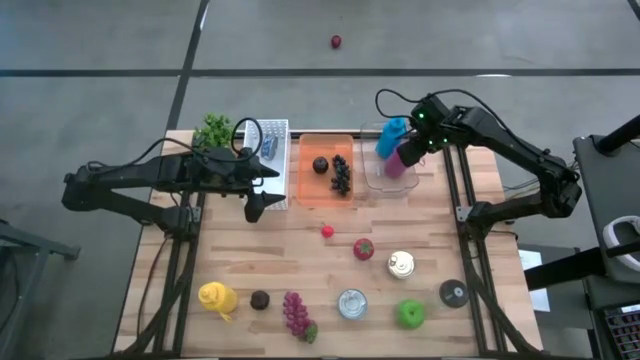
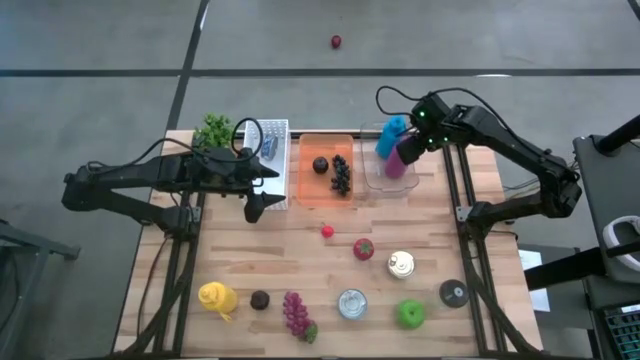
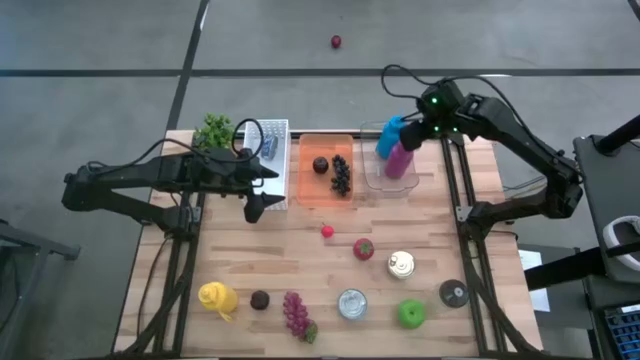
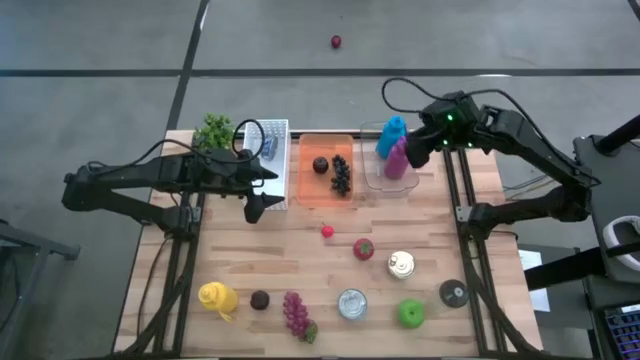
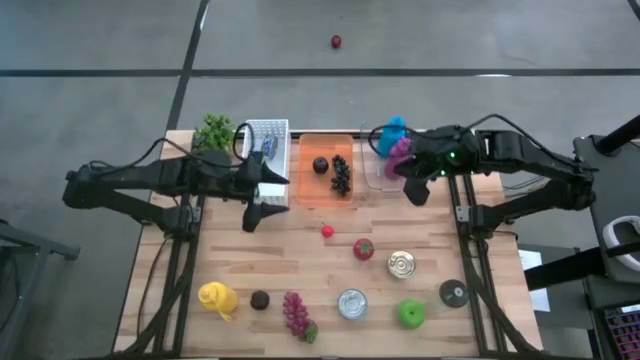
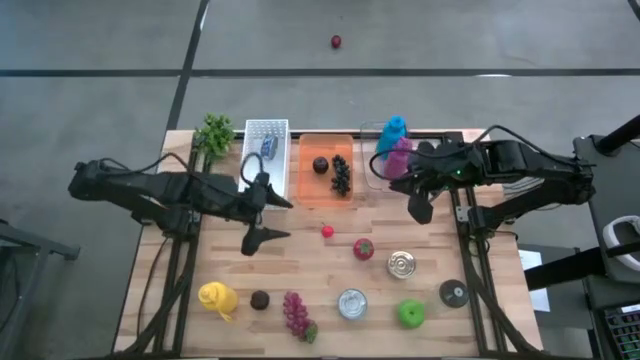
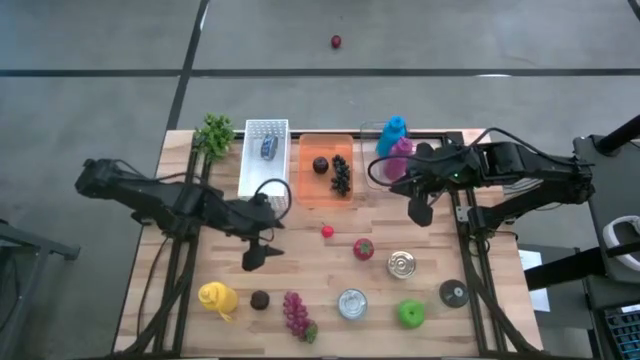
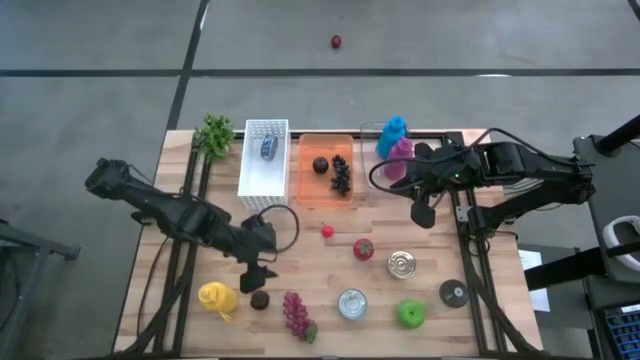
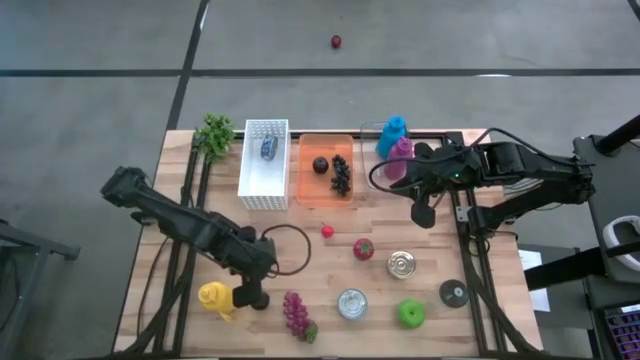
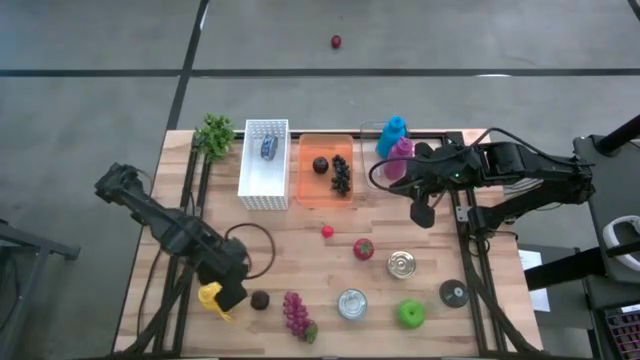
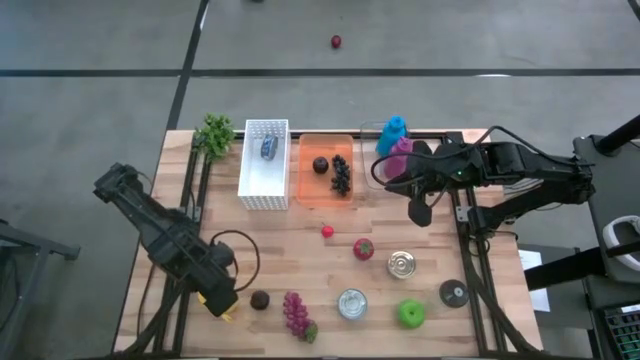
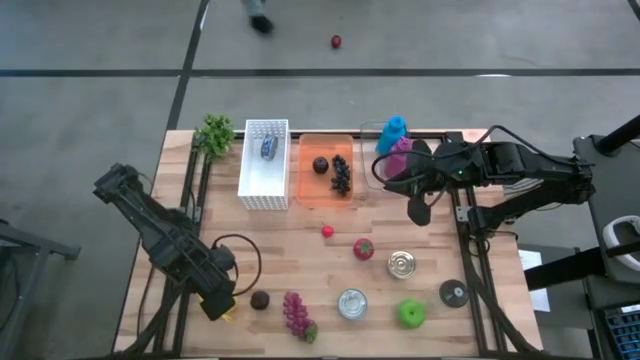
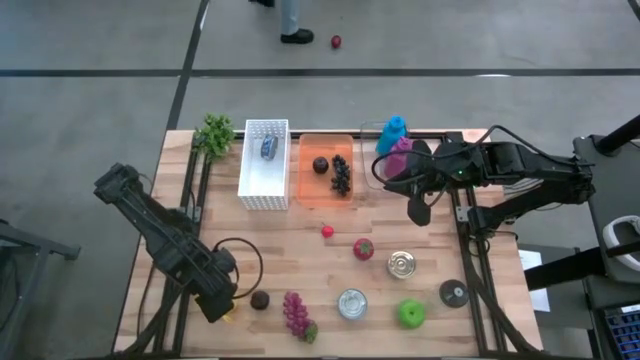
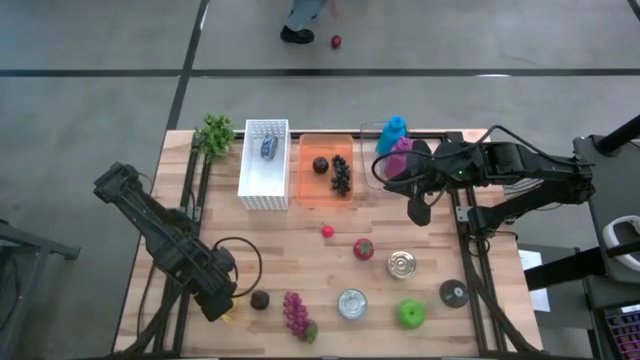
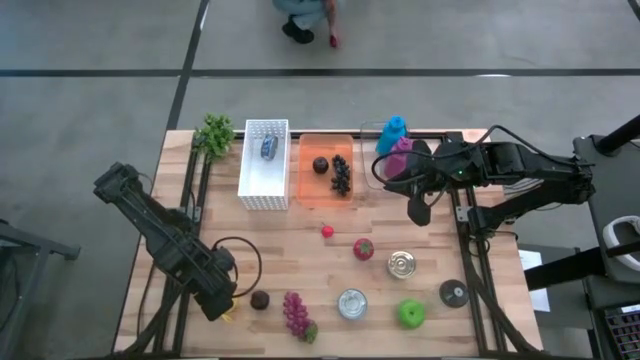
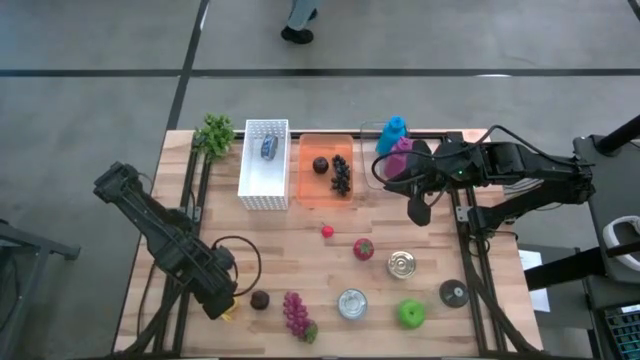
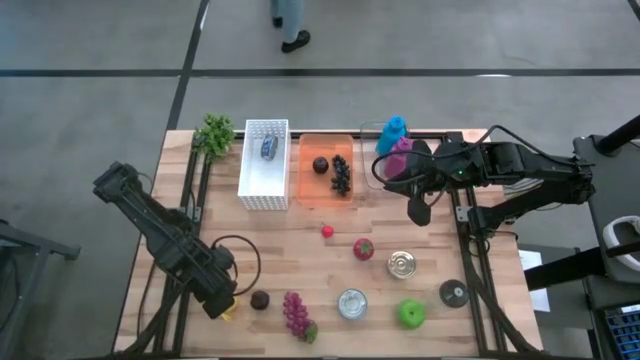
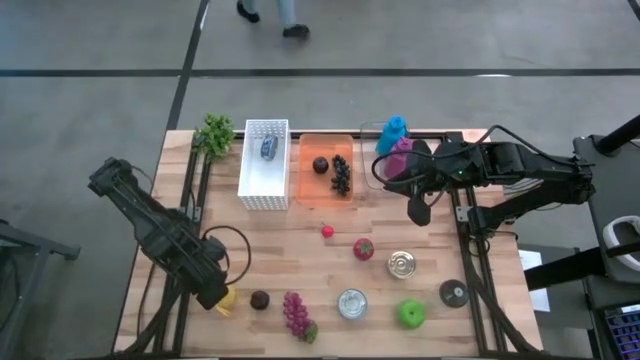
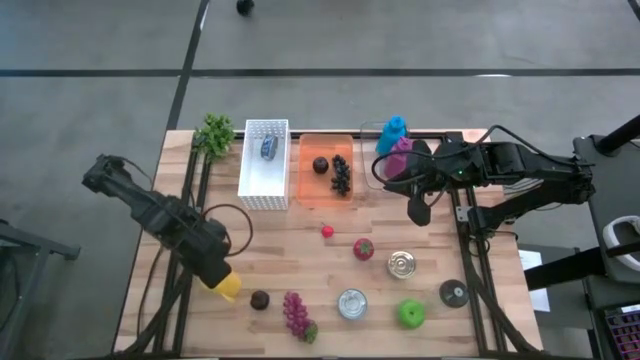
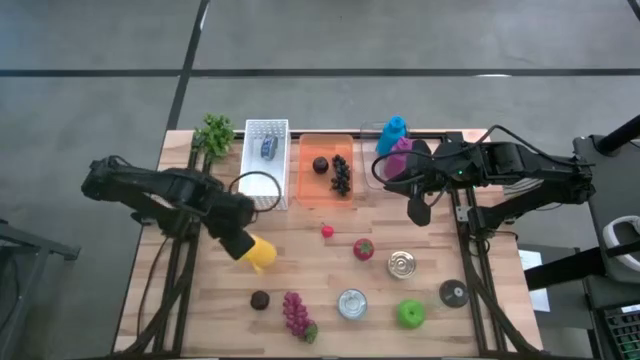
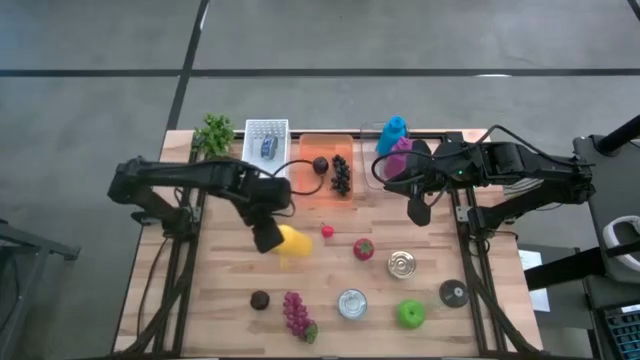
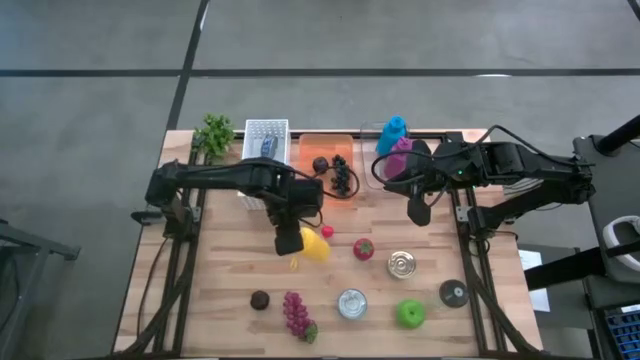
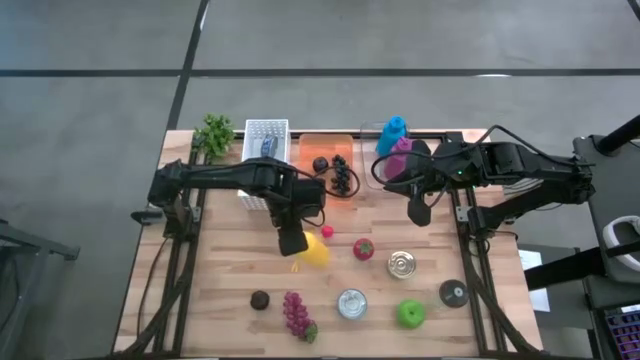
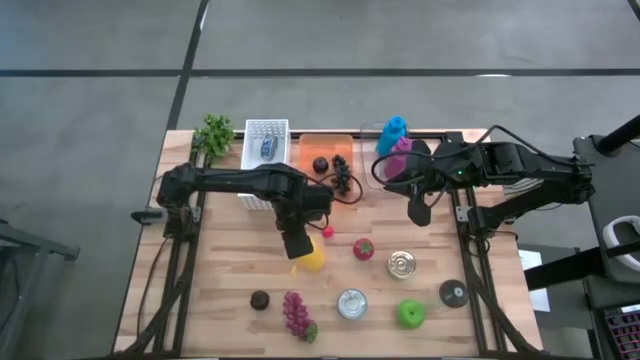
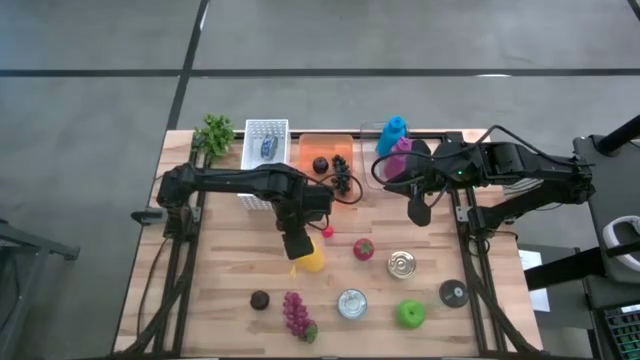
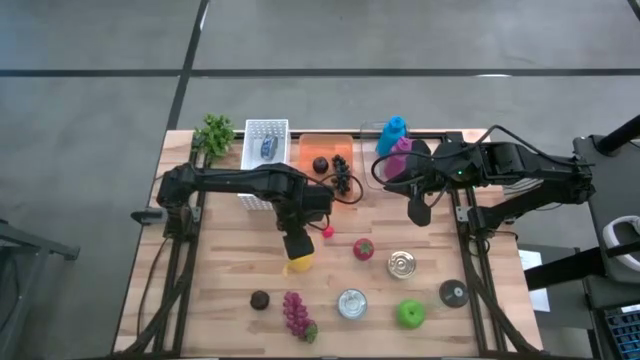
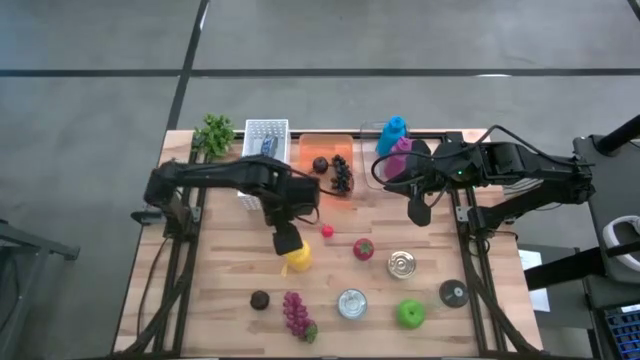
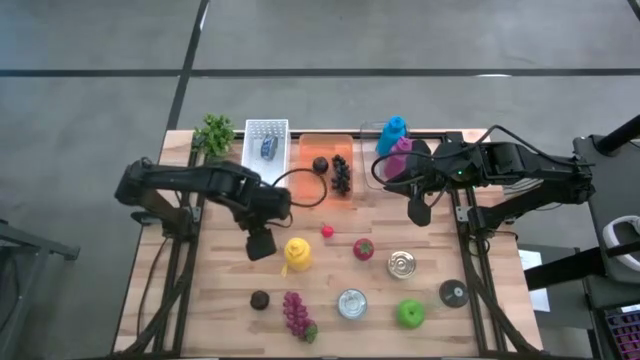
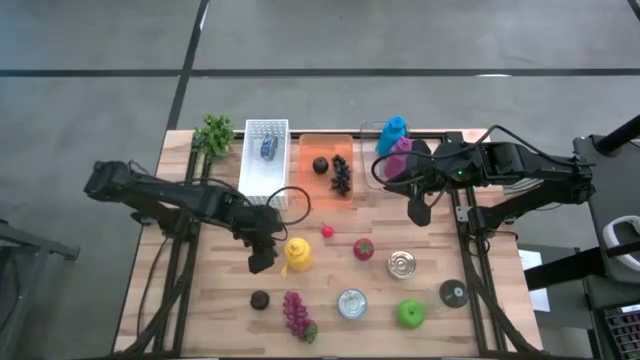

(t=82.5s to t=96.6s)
Task: Pick & Place Food Item
Put the yellow tumbler into the transparent bin

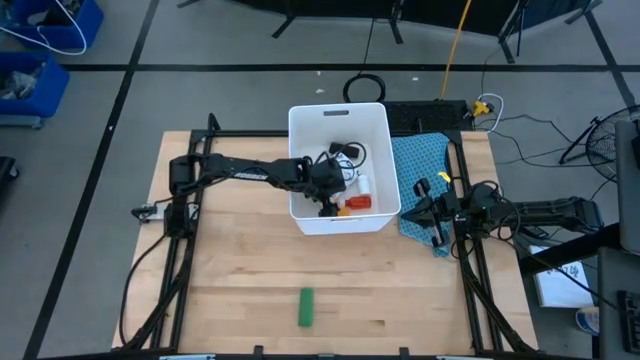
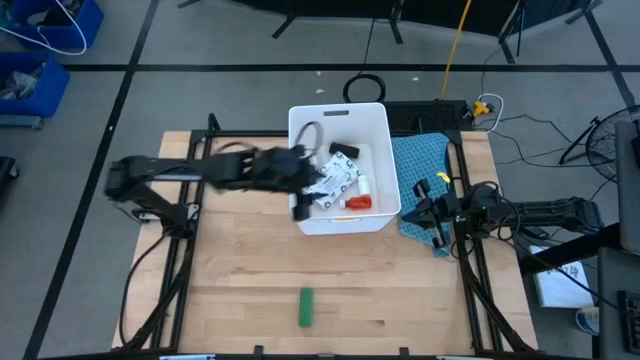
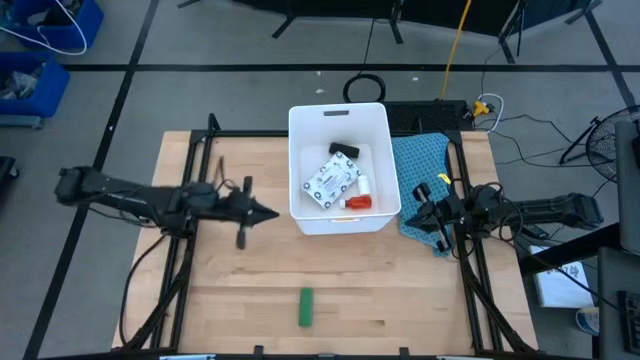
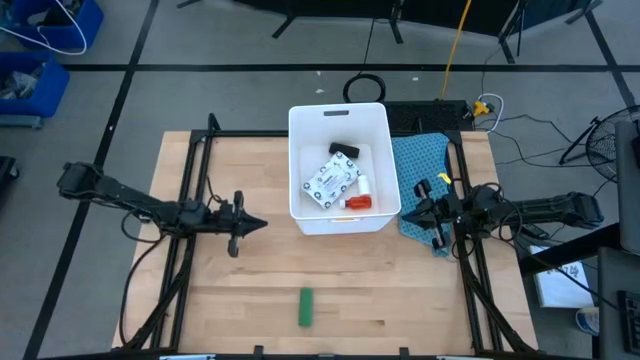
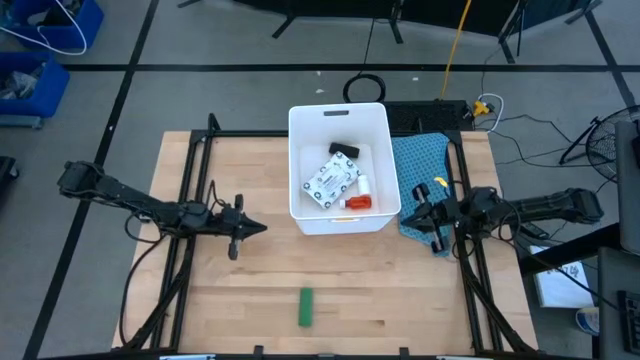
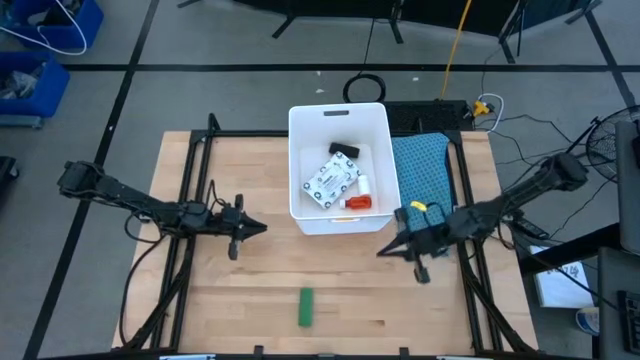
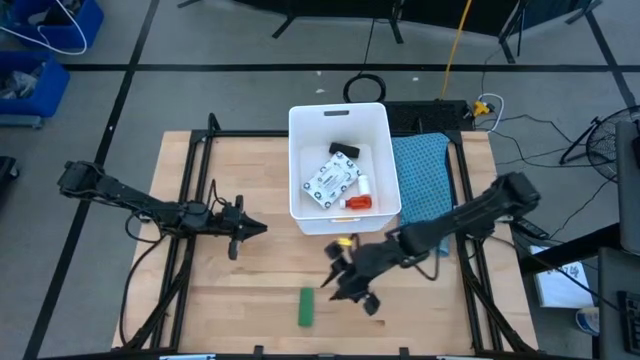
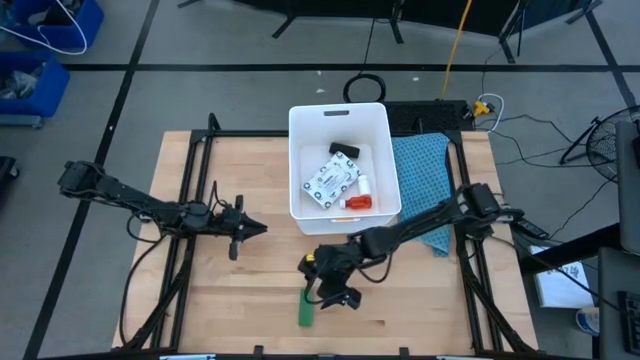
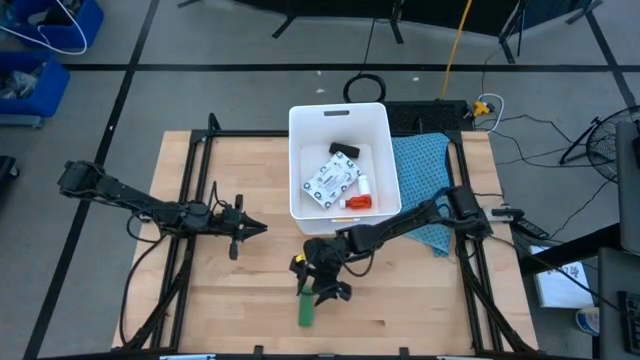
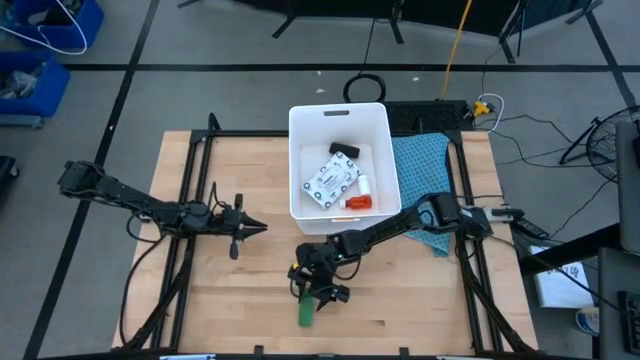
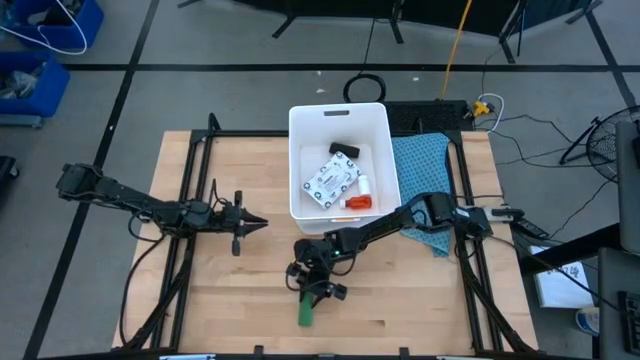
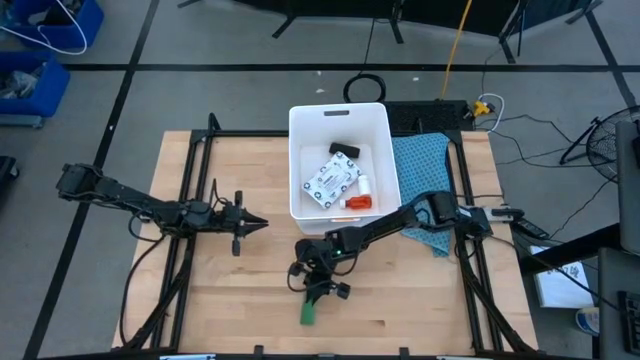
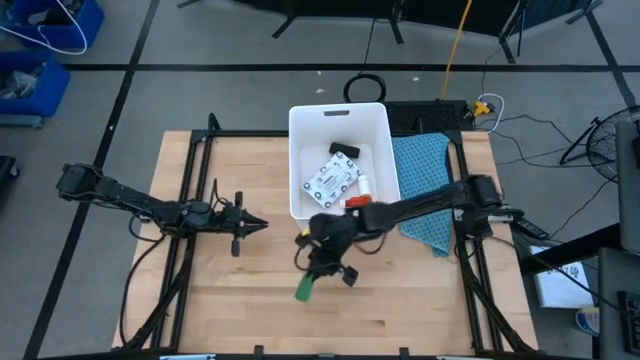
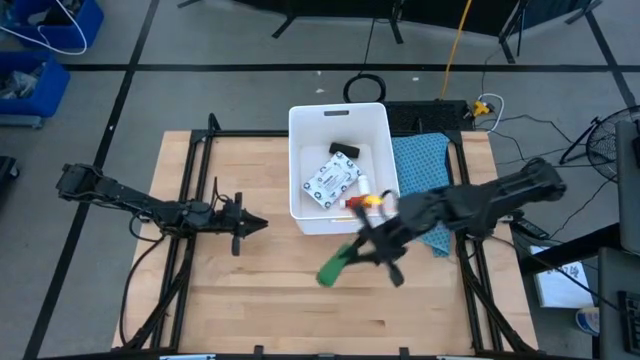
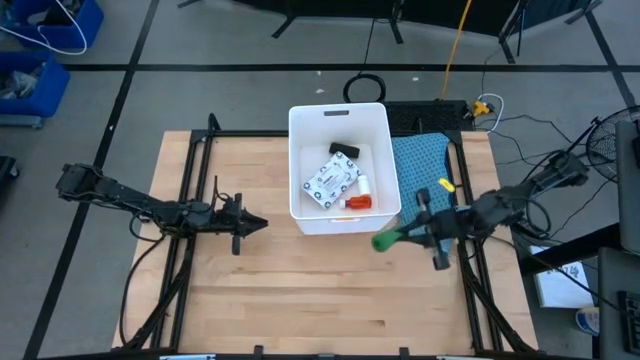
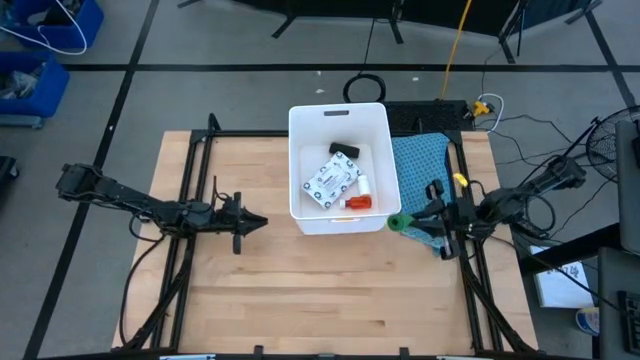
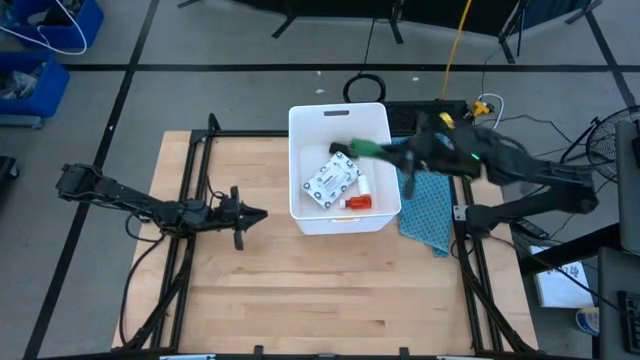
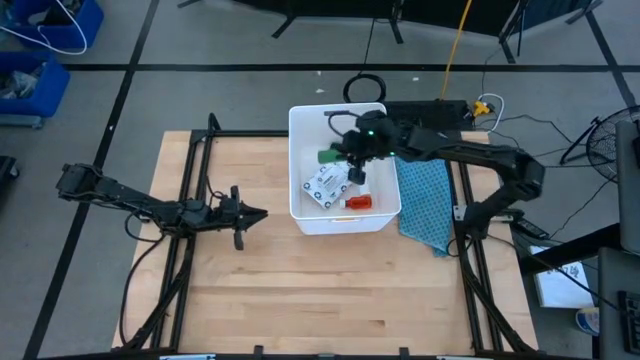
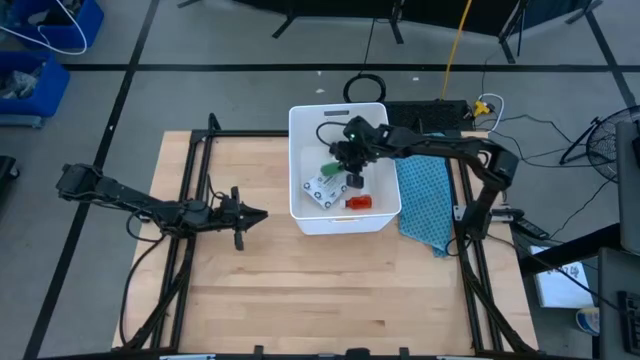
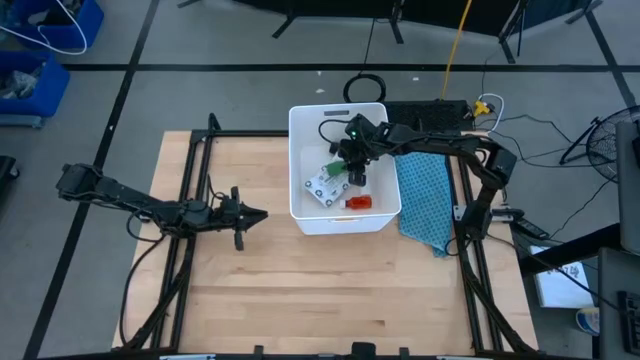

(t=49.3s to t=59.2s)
Task: Pick & place medical supplies in basket/bin
Put the green bandage into the white bin
